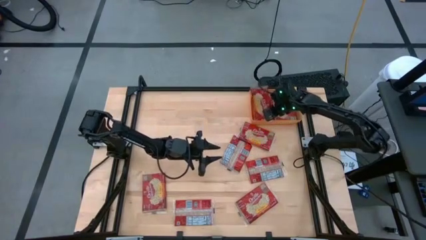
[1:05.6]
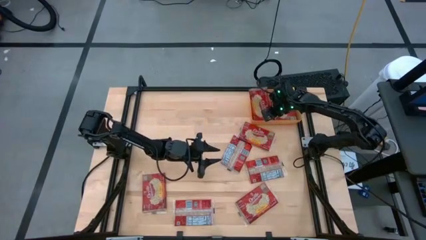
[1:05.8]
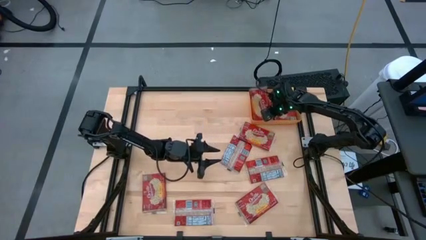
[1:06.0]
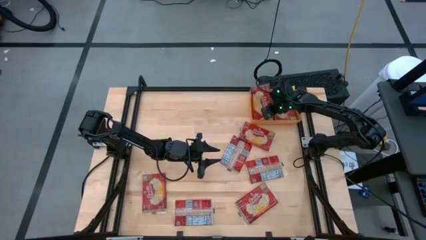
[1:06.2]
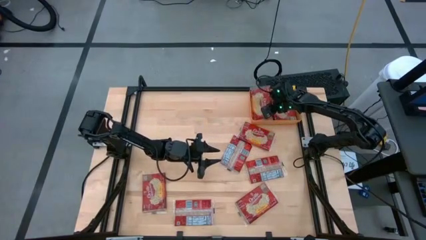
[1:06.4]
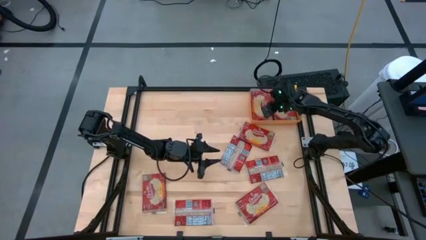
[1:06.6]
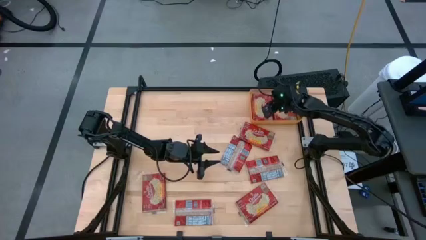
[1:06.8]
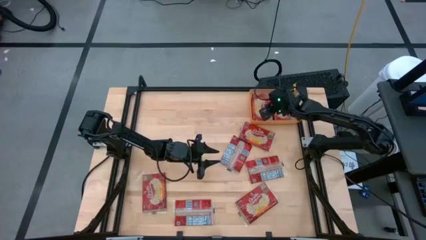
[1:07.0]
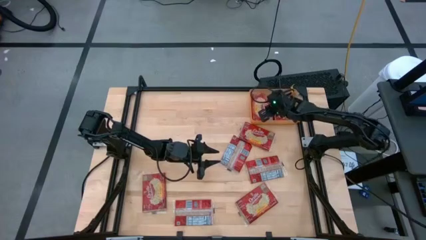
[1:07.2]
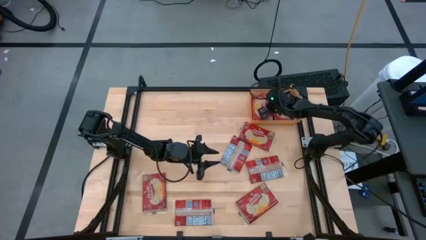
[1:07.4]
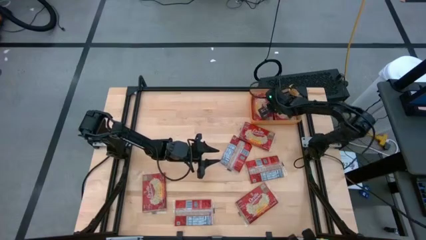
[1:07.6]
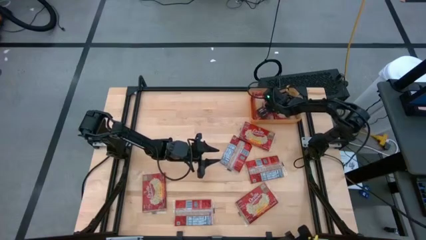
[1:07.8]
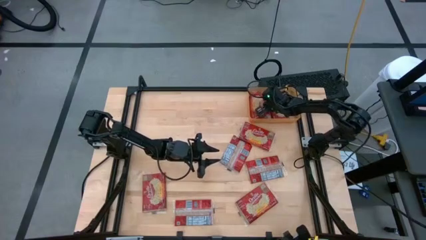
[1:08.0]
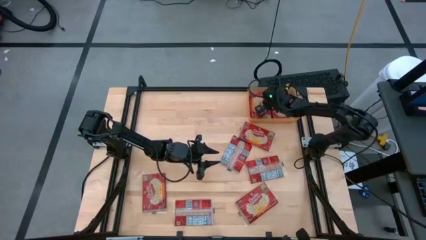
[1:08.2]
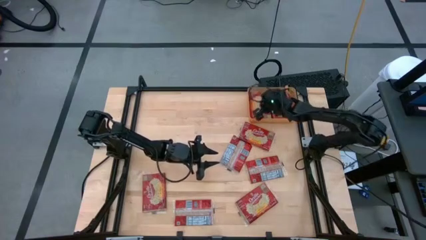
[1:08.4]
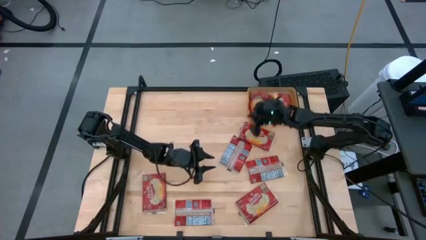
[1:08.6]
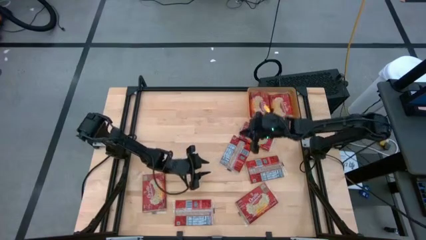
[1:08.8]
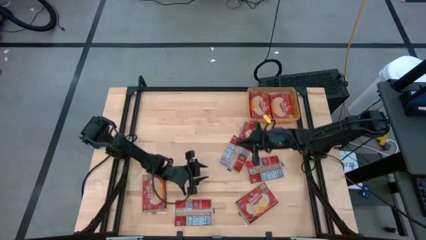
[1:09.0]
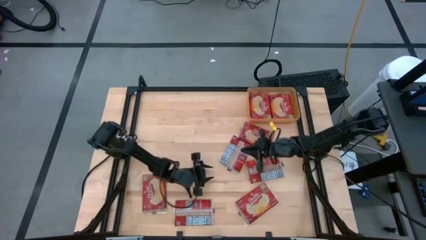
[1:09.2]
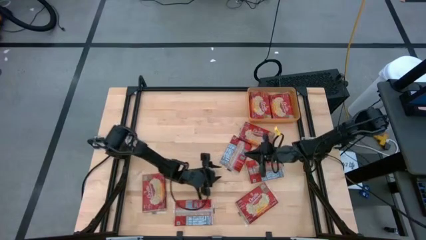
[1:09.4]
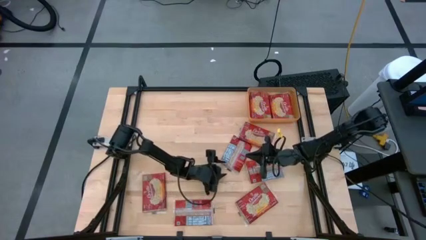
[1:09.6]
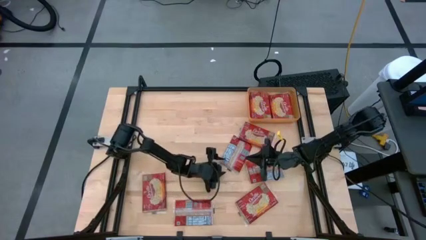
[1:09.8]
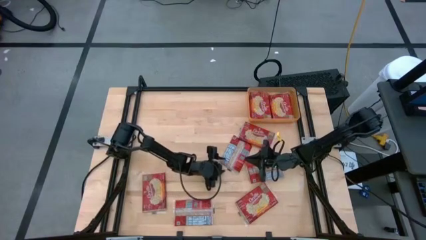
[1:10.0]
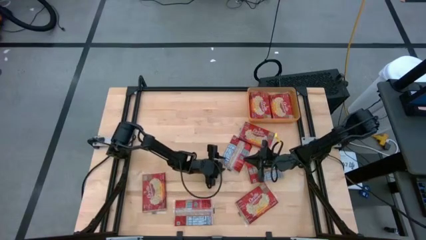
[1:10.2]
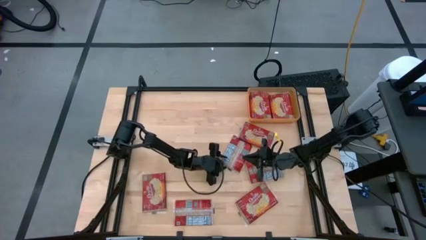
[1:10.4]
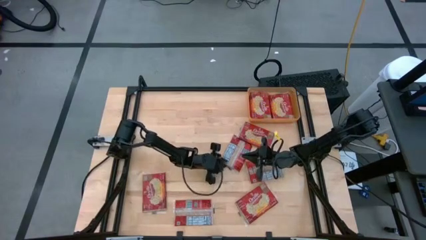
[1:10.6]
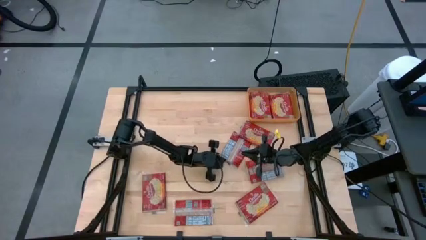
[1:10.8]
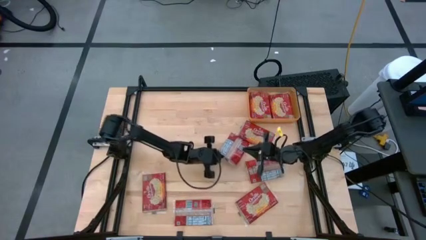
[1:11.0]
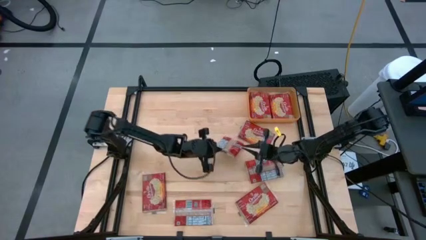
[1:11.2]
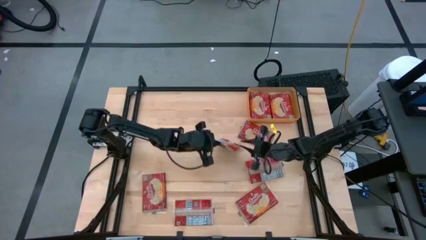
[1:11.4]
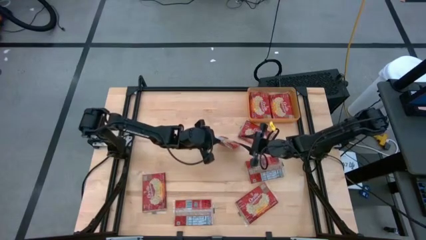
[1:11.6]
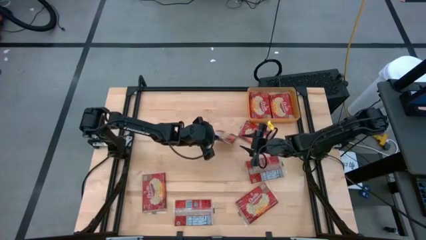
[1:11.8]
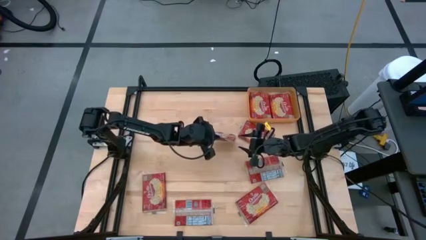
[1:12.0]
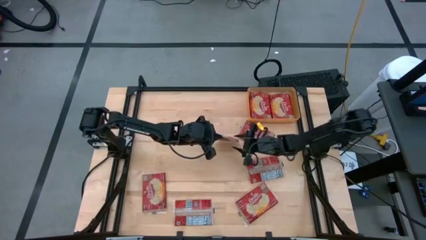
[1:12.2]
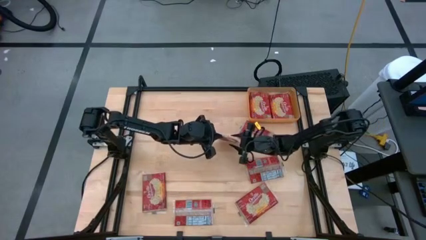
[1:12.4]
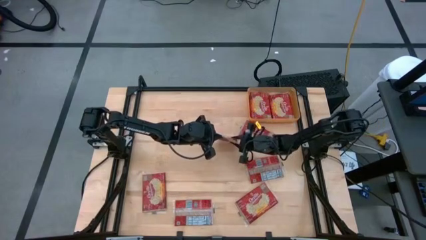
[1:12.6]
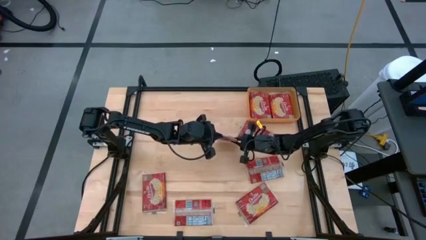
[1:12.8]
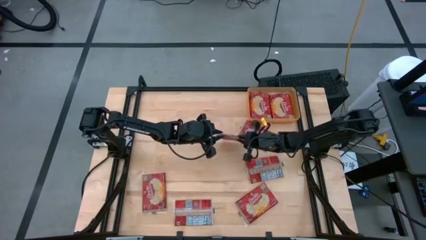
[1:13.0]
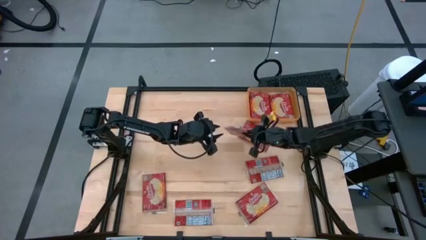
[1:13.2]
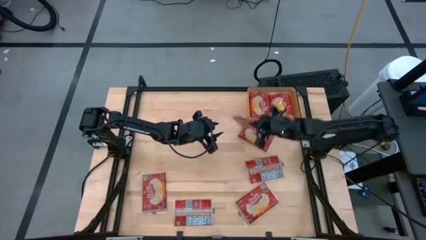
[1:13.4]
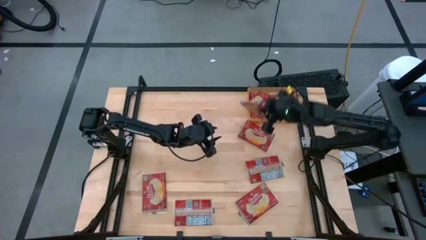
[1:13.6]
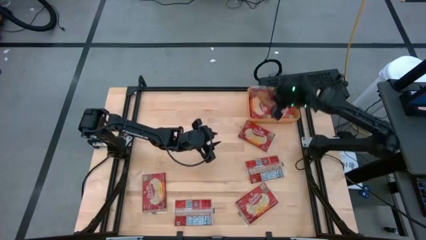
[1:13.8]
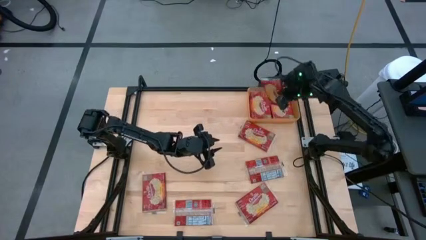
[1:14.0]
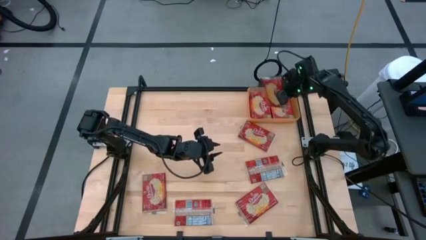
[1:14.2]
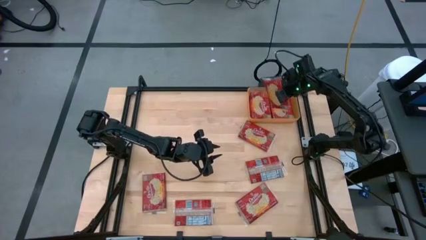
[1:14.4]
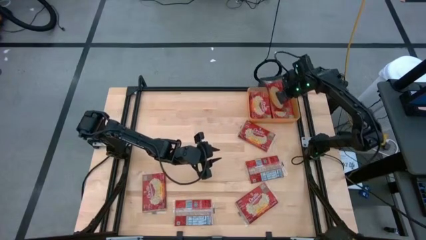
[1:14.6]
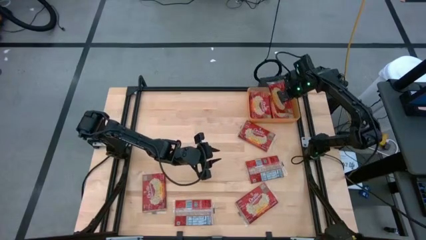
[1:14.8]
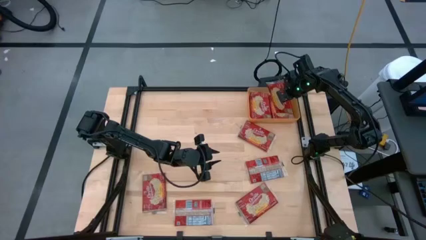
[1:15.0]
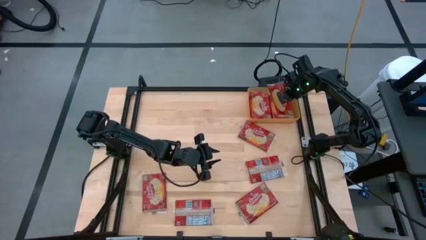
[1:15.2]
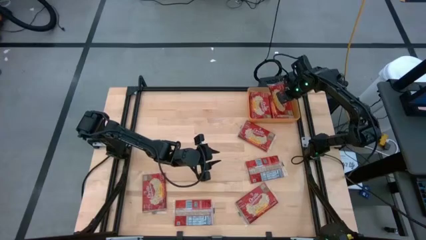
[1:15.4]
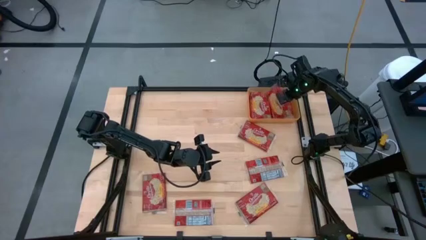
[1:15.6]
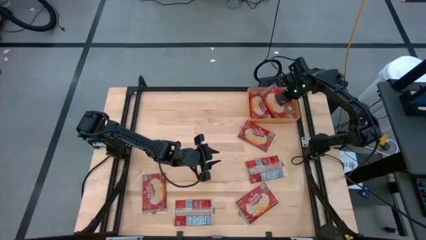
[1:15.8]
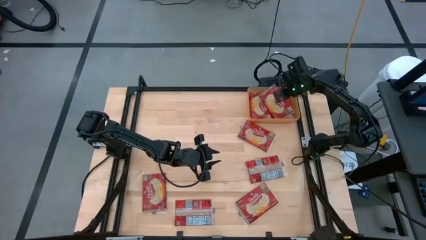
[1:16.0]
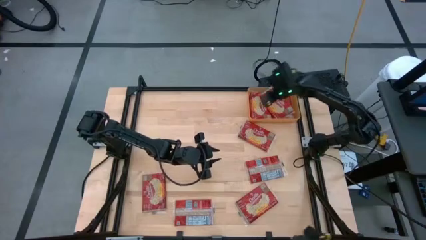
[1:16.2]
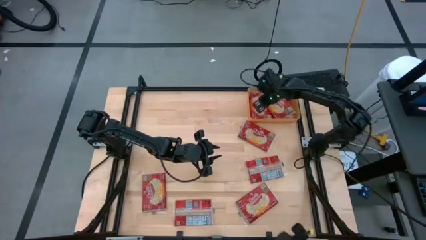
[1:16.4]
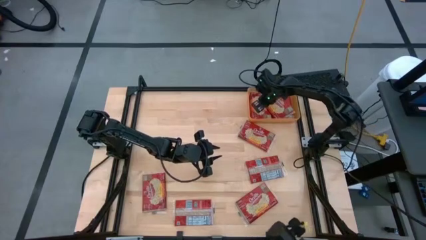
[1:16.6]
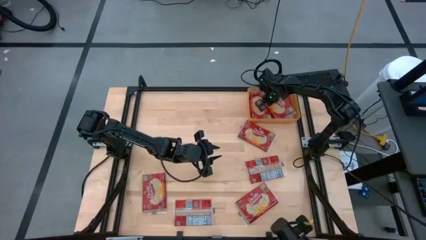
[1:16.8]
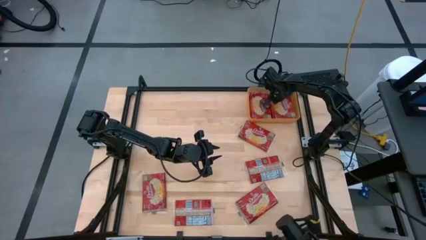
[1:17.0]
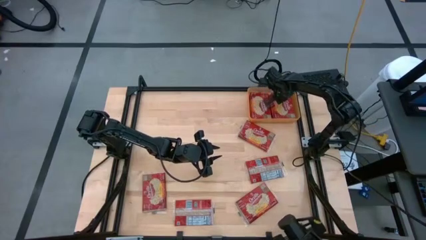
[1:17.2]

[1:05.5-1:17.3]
Task: Sort popcorn bags into baskets
Put the red popcorn bag into the orange bin

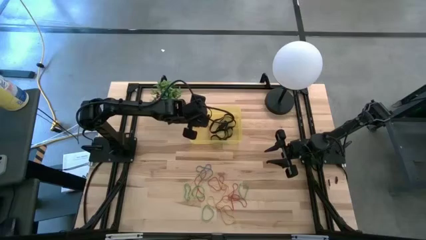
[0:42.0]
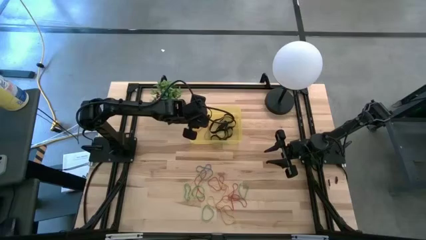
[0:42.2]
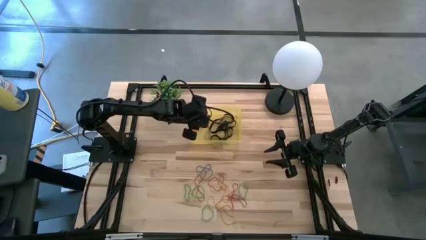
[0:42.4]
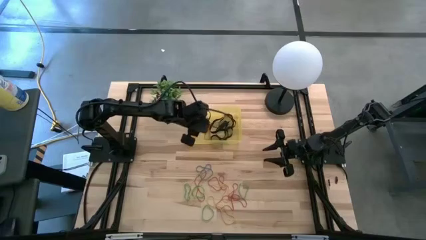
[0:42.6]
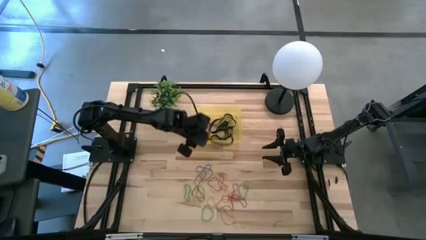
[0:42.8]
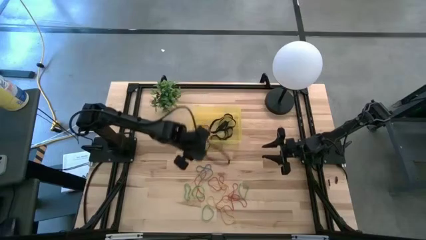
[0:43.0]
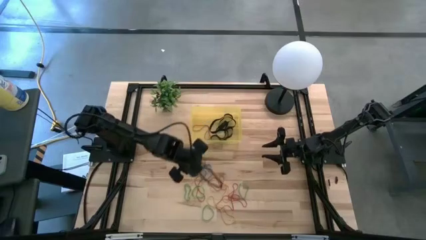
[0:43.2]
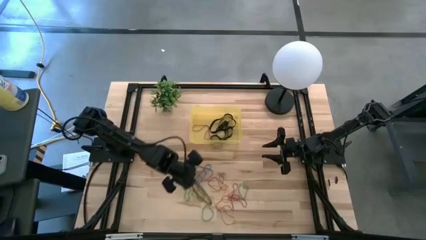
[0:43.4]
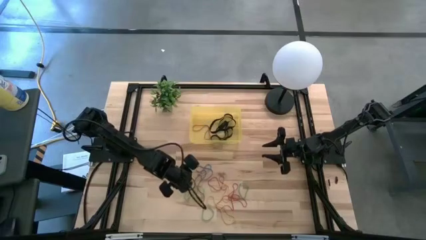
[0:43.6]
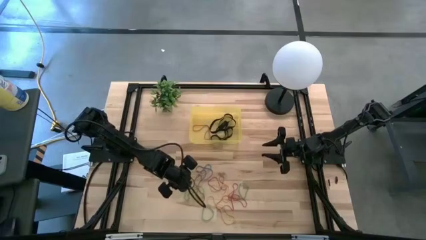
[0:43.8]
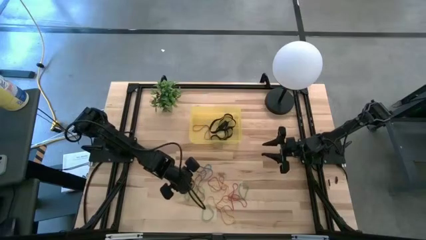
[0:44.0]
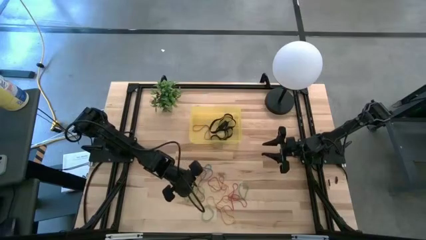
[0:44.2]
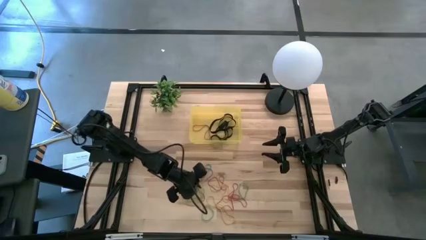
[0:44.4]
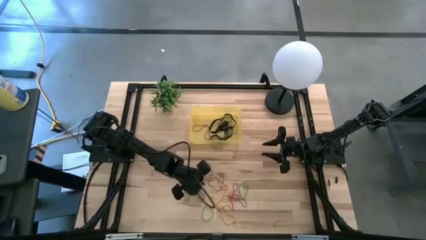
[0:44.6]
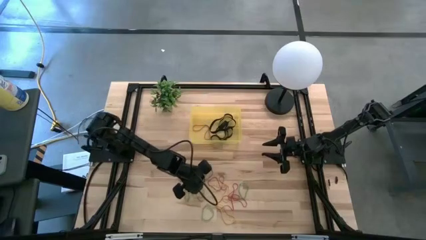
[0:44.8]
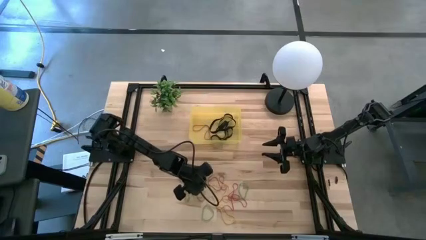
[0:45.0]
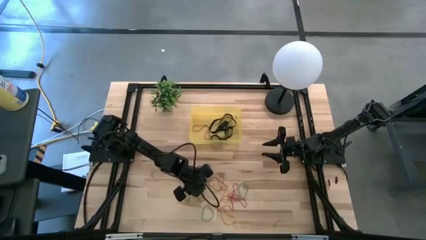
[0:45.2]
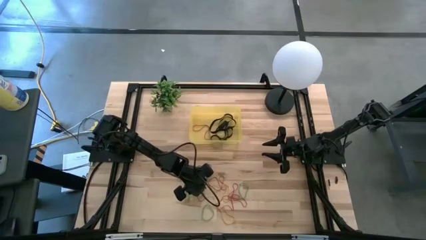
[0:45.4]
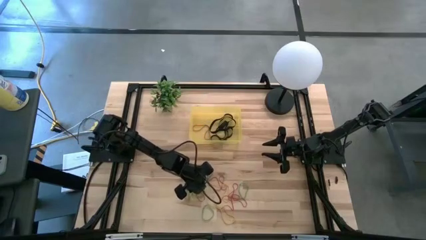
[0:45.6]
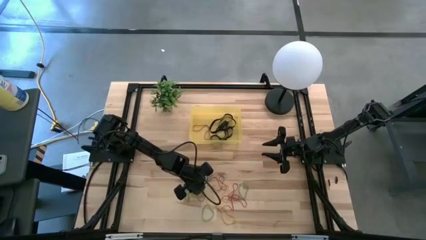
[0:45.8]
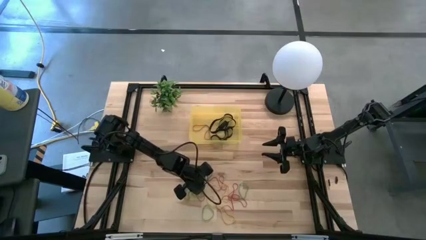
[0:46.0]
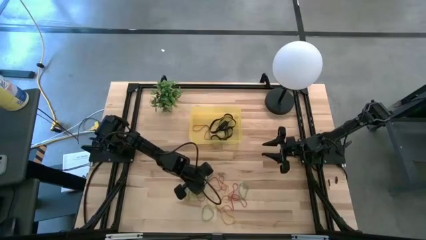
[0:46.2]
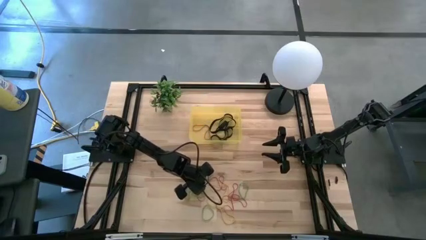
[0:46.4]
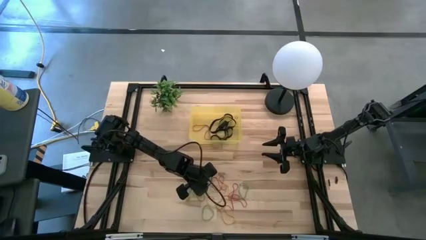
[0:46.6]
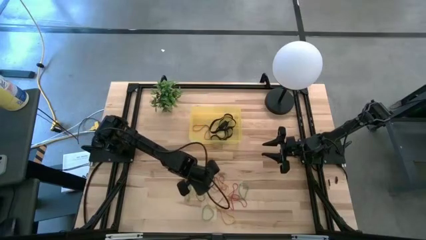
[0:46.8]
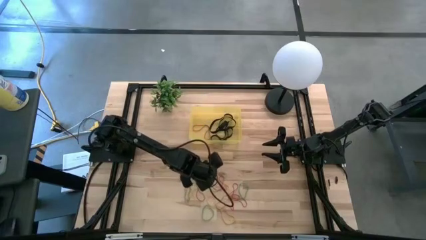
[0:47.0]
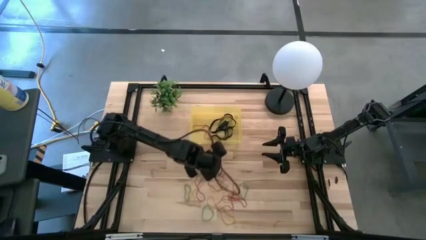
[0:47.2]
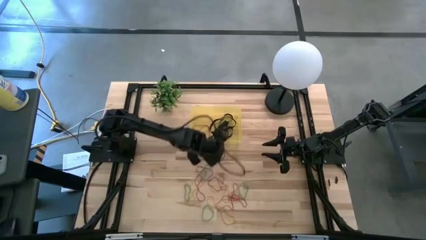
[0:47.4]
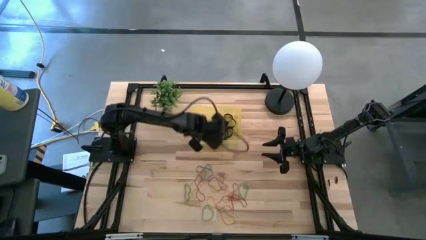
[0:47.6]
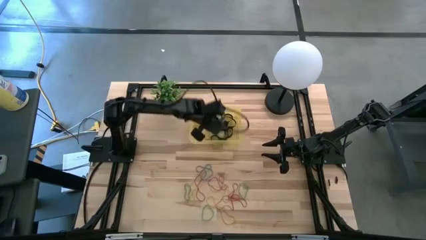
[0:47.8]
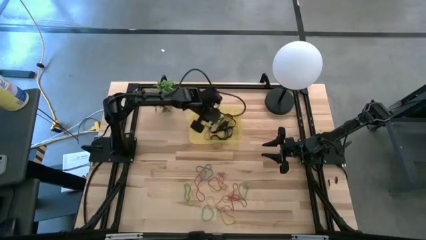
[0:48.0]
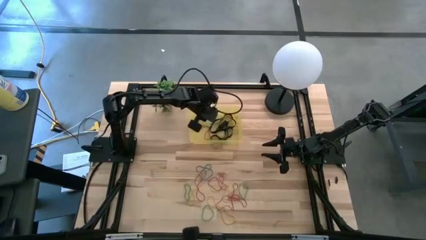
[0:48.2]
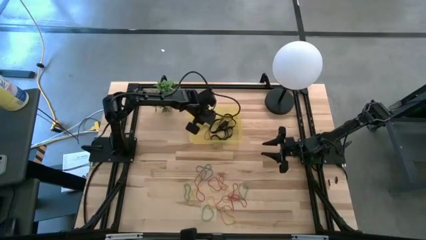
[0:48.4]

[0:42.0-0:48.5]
Task: Pick and place rubber bands into bin
Put the green rubber band into the yellow bin
